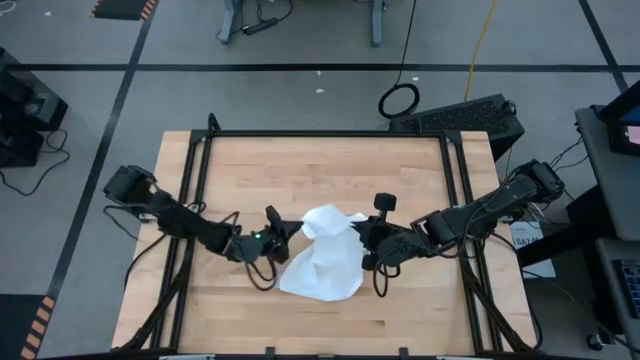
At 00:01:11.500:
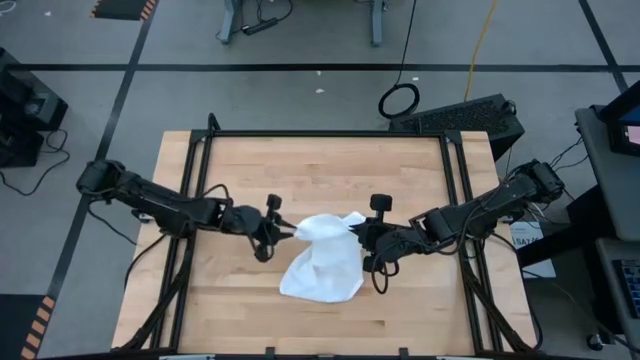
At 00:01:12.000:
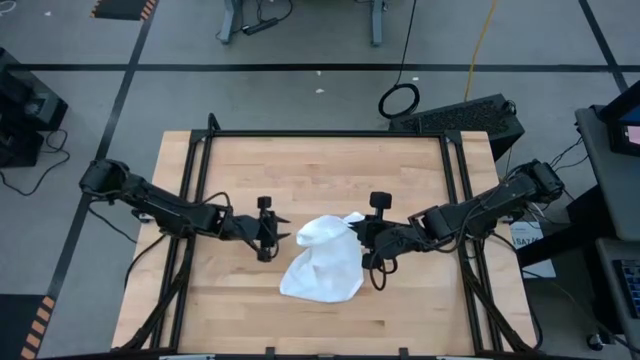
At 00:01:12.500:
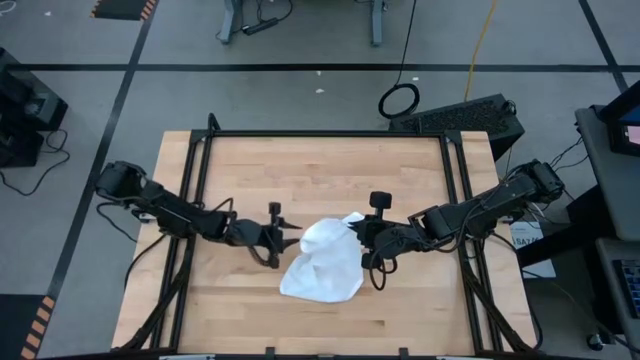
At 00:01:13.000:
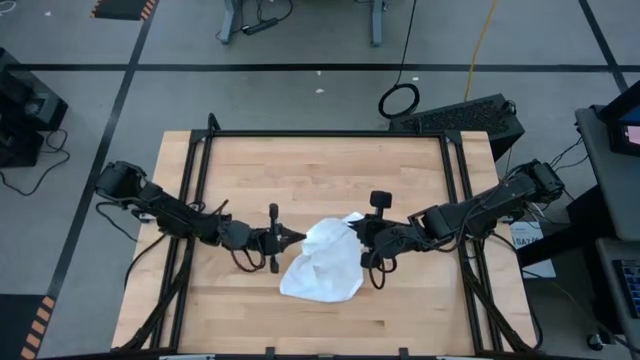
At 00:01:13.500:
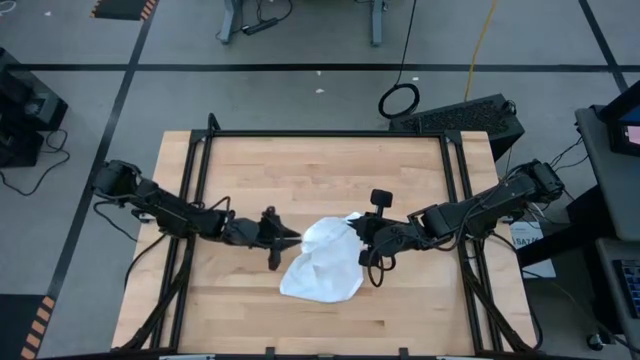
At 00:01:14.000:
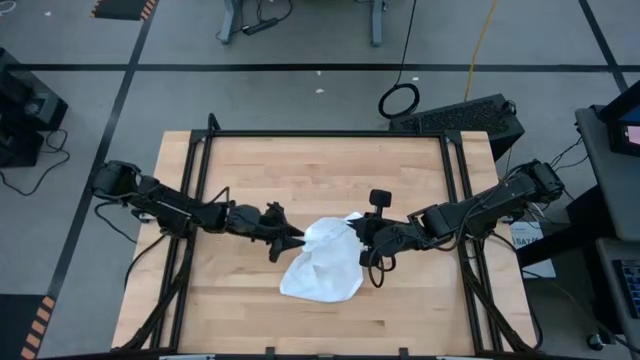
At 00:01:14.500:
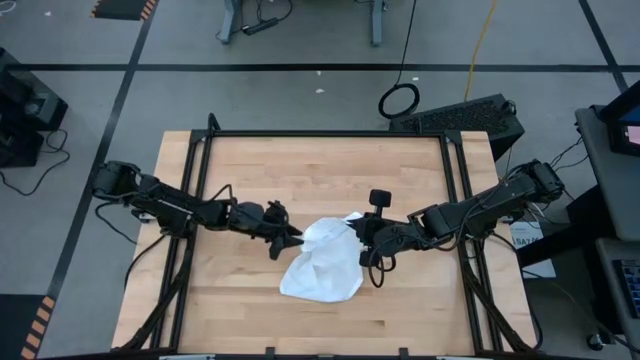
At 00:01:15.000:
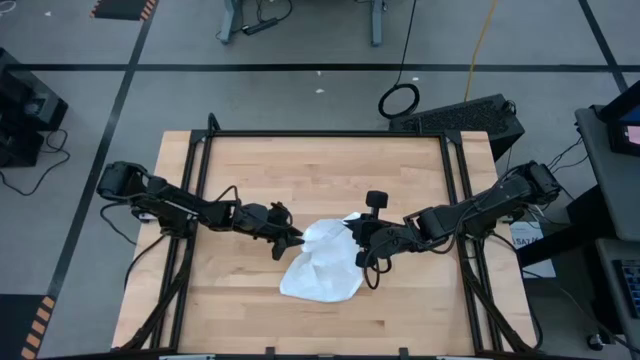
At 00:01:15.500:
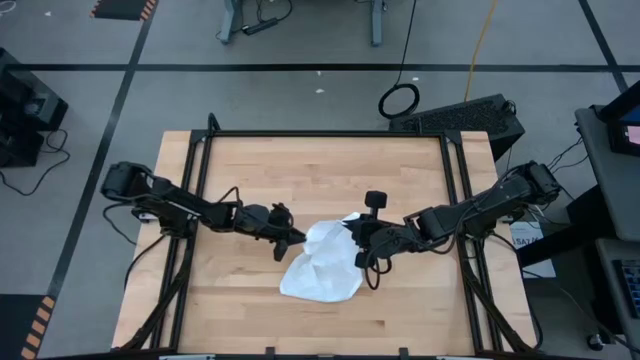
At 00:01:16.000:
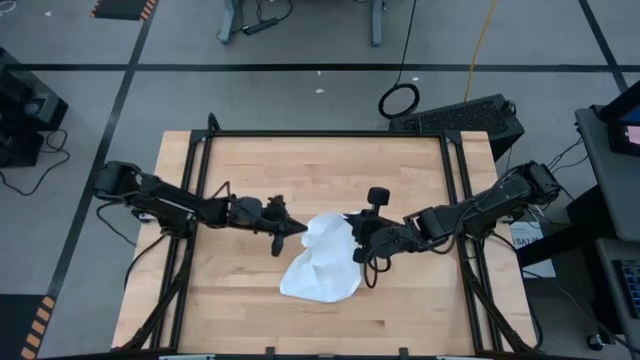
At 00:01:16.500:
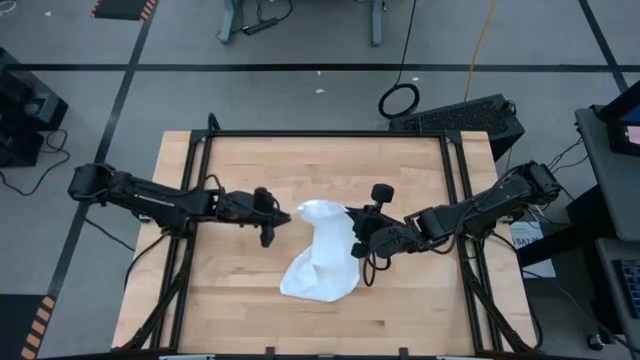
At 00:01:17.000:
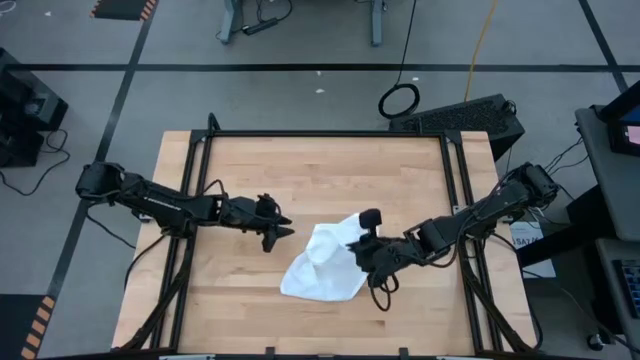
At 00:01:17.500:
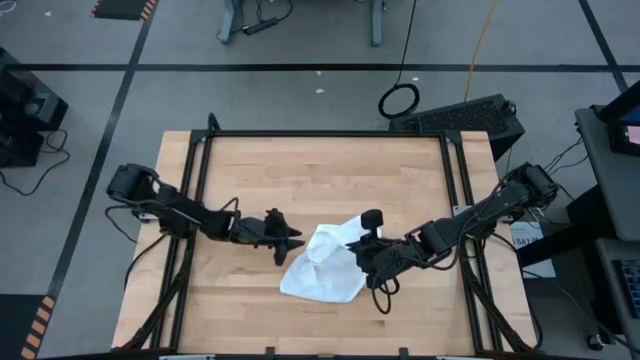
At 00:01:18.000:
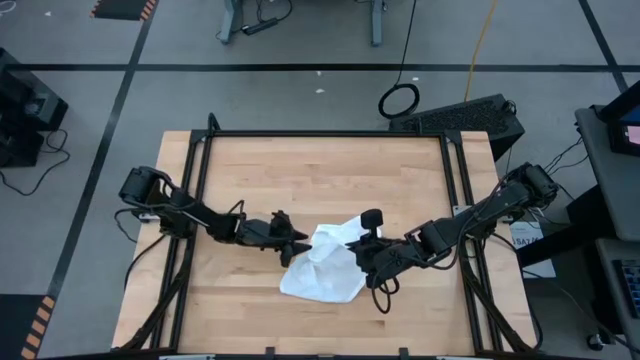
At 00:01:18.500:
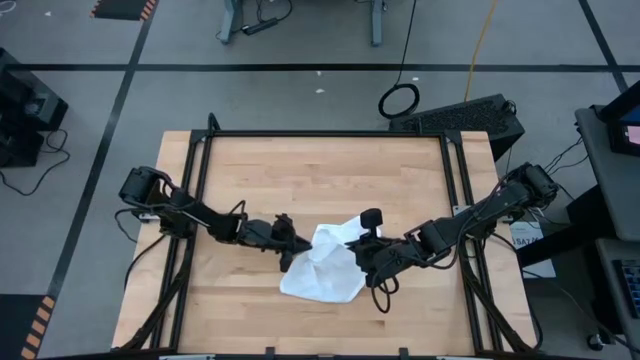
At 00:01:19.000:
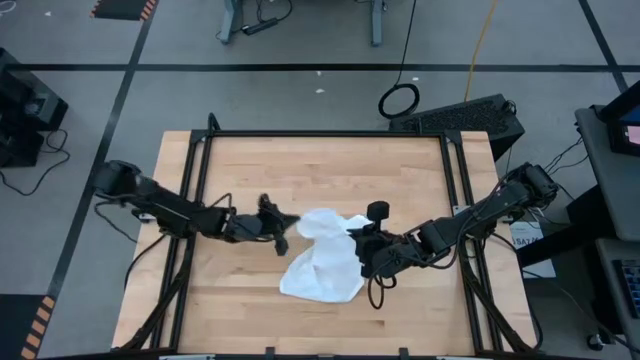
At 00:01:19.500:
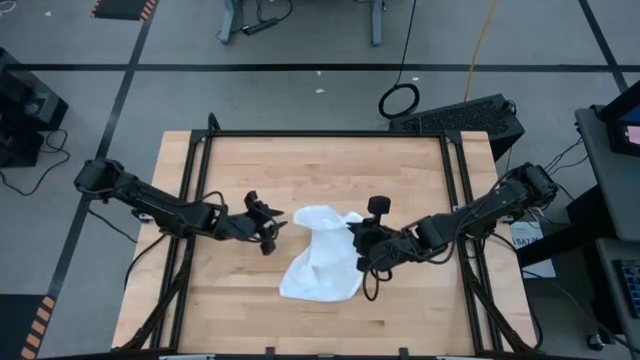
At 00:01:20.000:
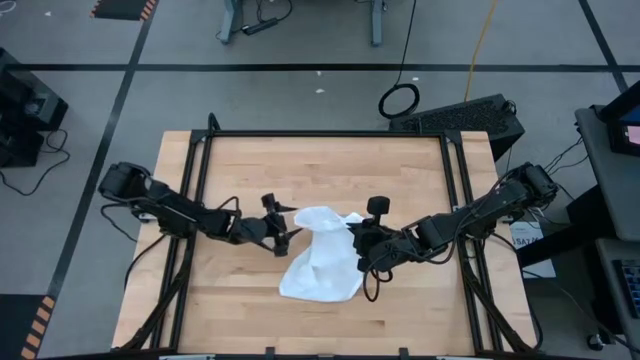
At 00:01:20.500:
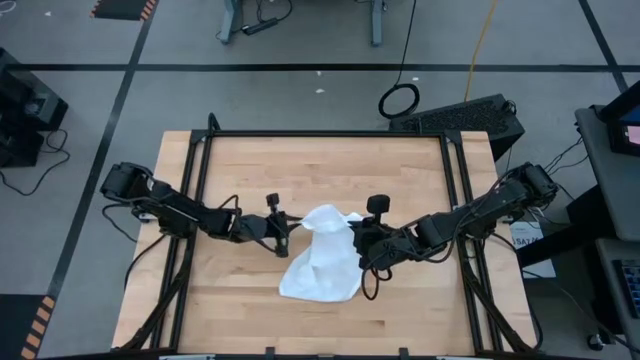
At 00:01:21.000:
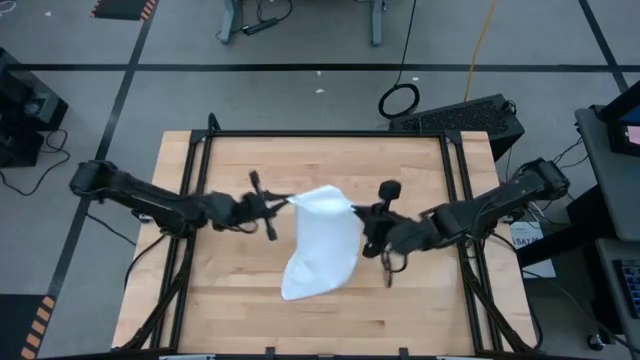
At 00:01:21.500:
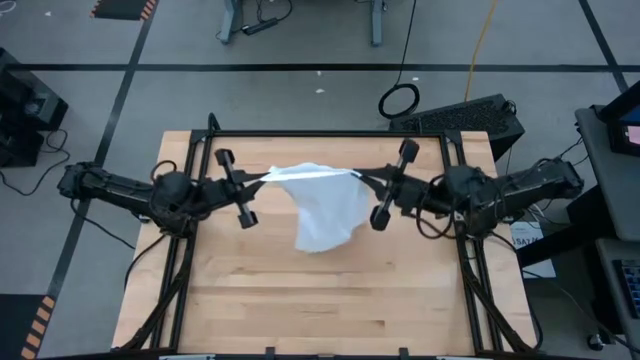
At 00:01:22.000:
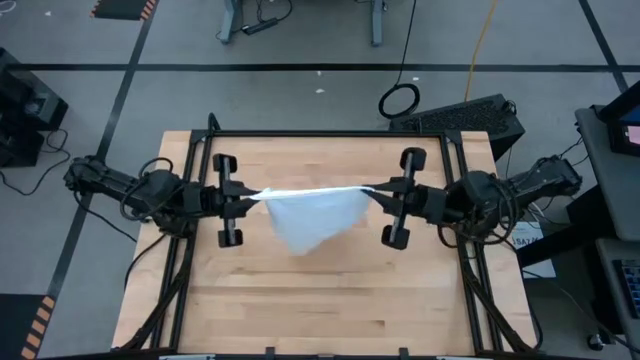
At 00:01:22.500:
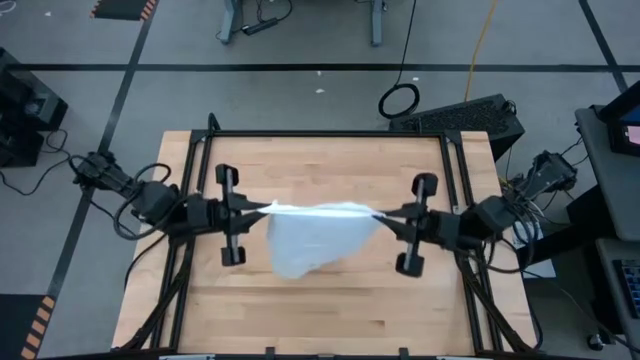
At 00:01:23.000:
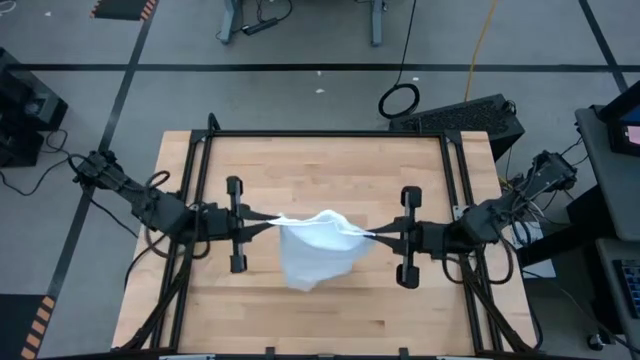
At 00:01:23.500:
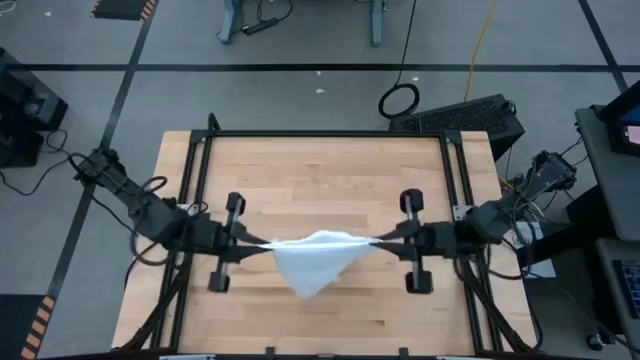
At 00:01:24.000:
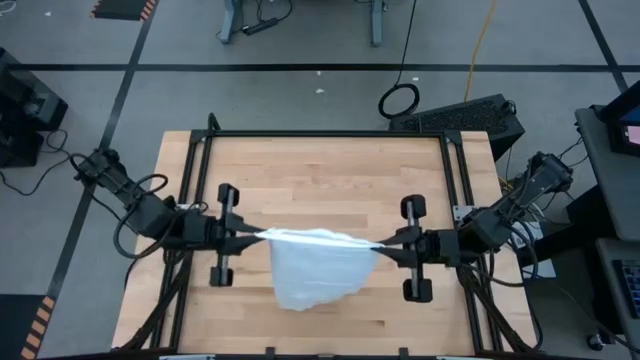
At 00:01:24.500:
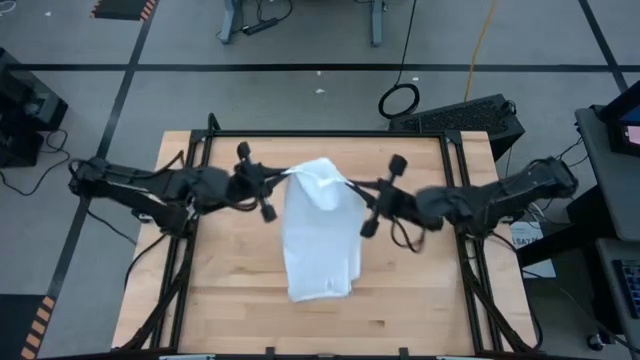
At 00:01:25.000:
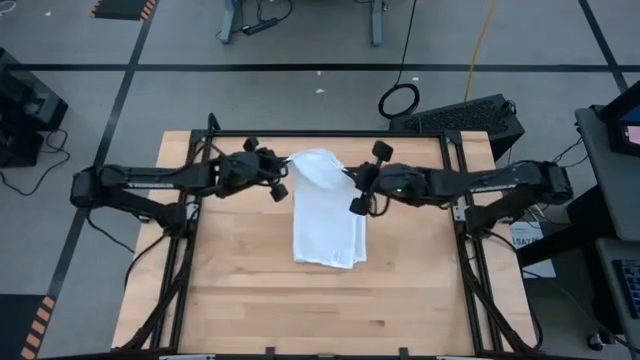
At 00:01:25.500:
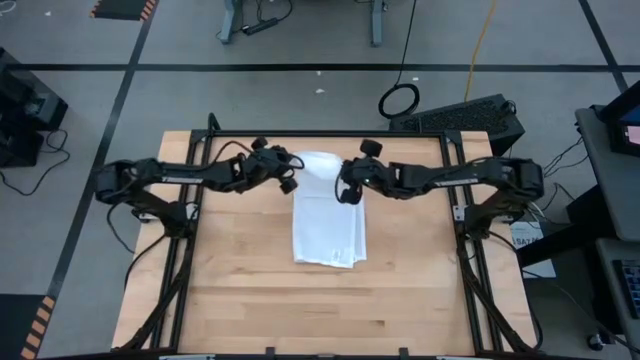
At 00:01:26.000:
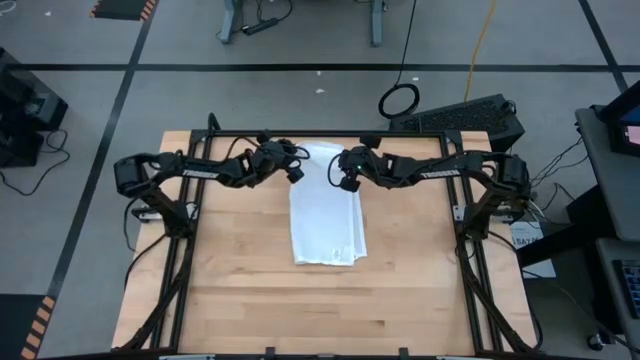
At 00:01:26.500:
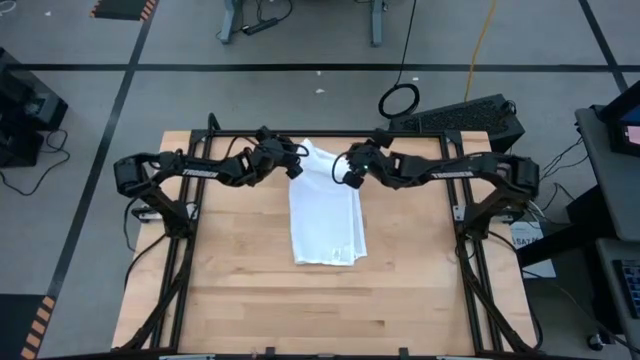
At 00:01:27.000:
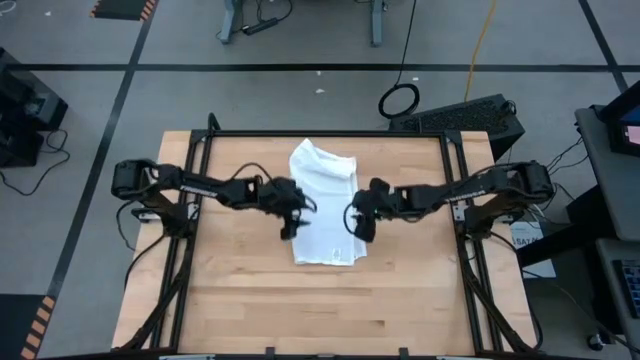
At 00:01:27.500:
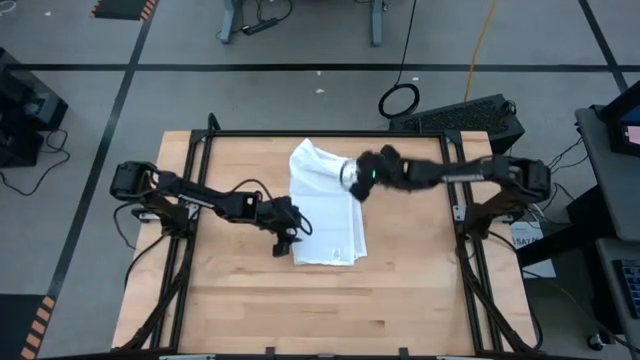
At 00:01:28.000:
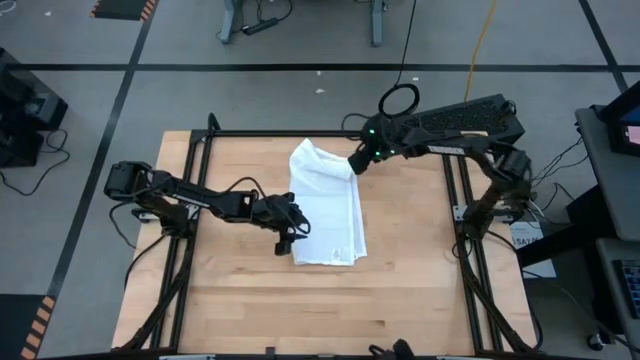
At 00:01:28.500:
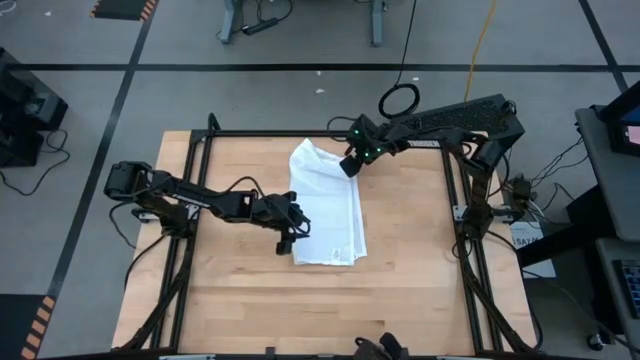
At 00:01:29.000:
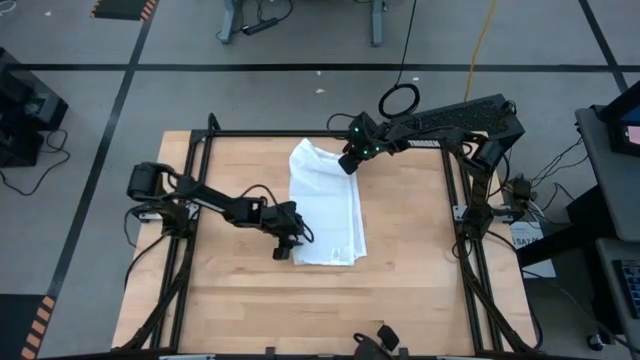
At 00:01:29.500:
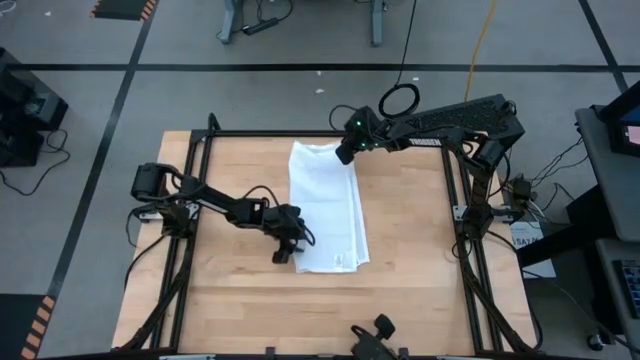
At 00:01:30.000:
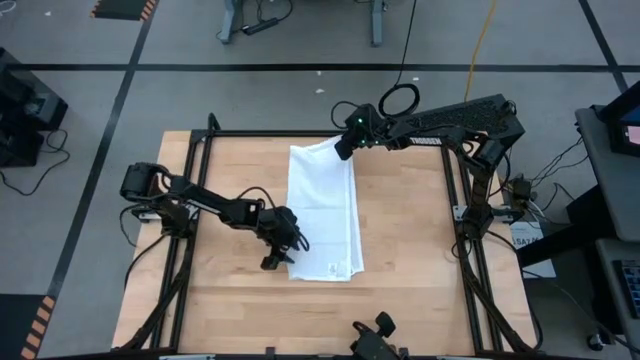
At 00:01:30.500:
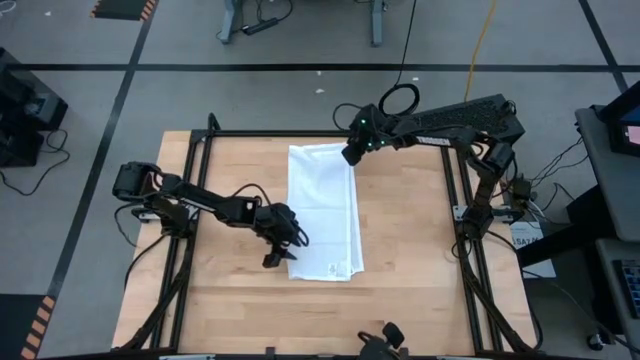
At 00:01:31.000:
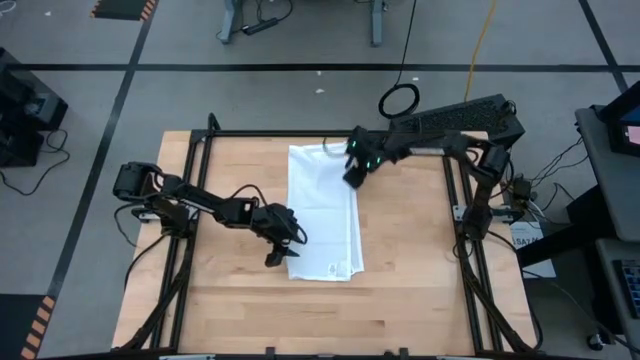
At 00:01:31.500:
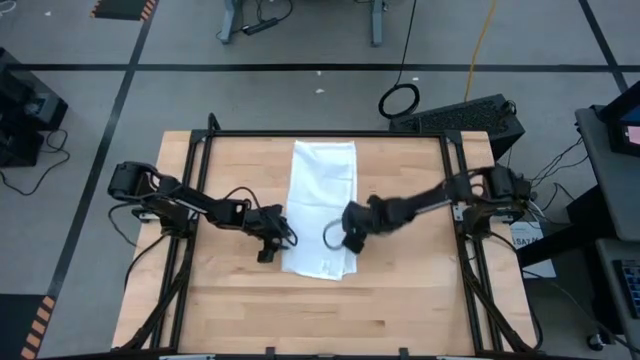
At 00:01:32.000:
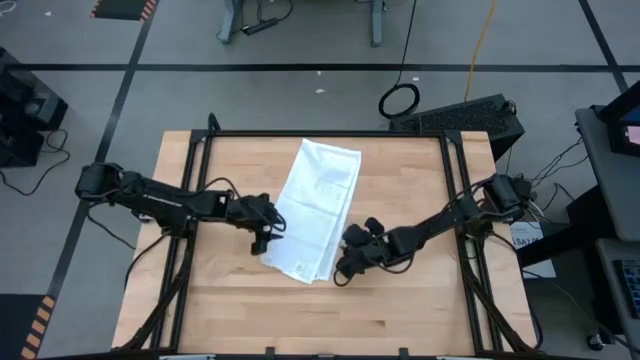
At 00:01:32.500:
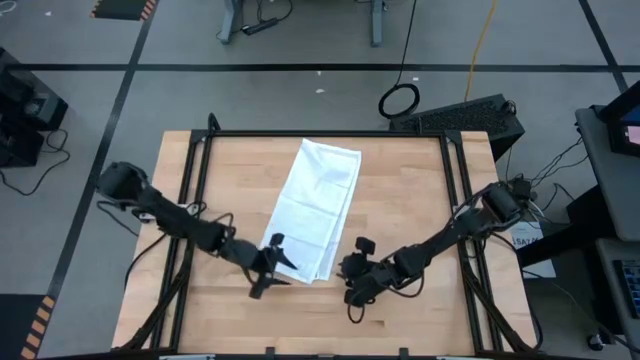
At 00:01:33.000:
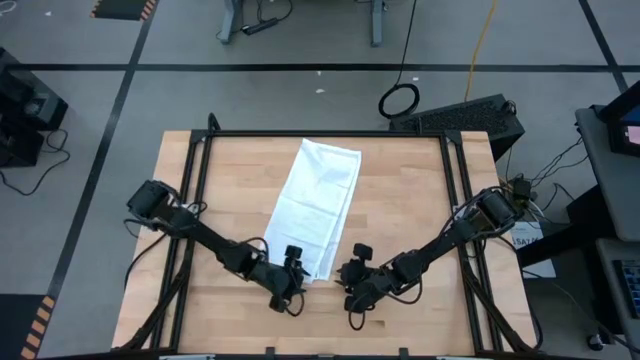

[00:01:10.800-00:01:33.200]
Task: Roll towel
Roll the white towel
